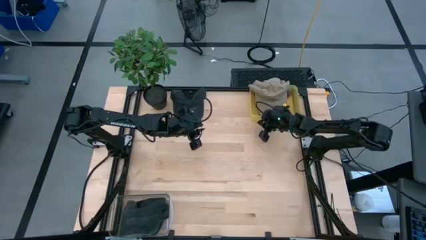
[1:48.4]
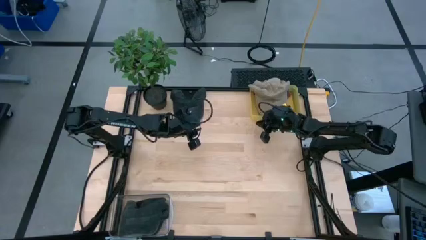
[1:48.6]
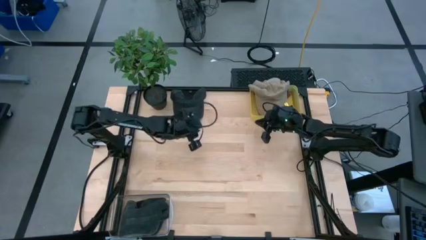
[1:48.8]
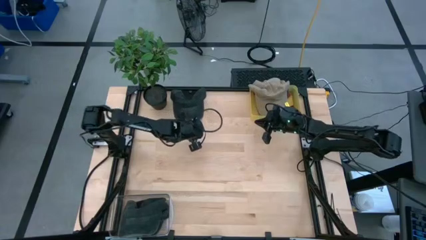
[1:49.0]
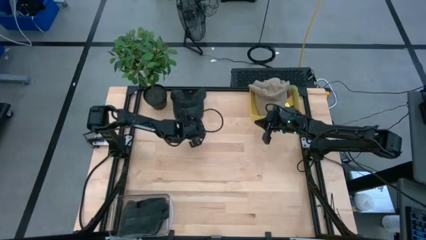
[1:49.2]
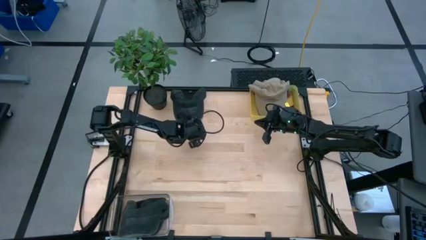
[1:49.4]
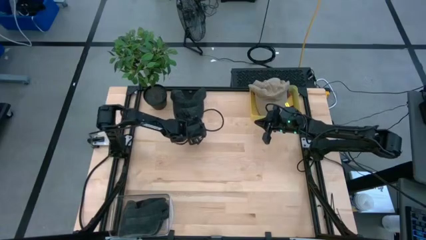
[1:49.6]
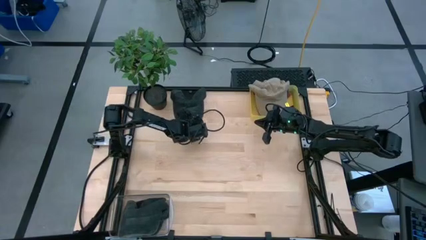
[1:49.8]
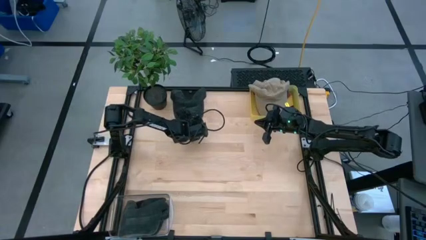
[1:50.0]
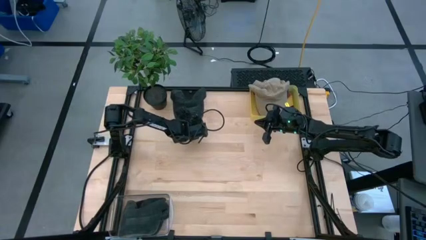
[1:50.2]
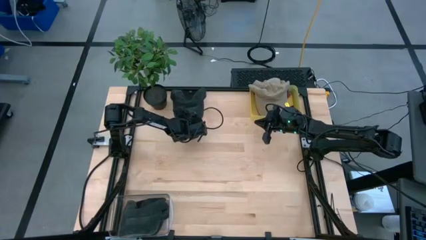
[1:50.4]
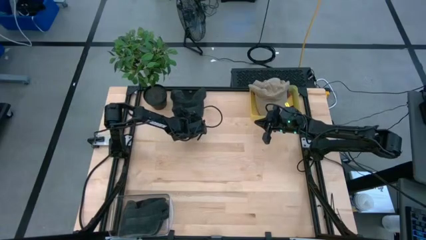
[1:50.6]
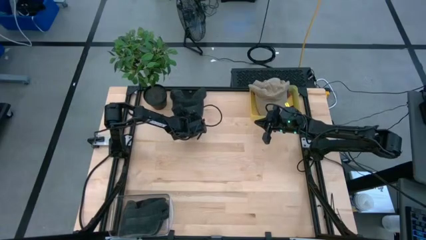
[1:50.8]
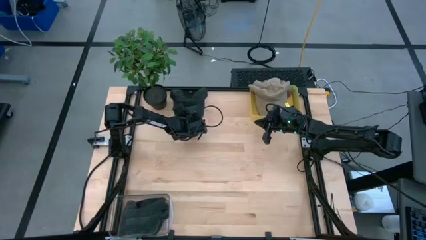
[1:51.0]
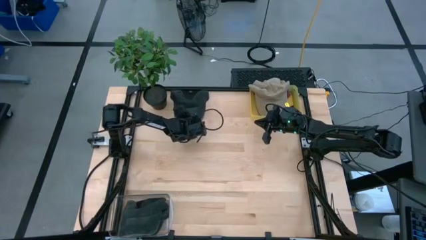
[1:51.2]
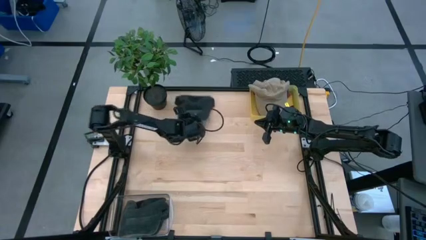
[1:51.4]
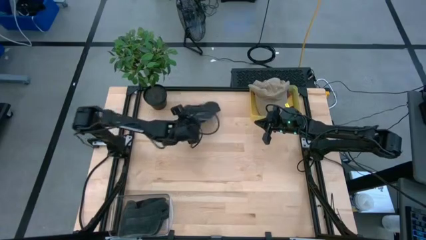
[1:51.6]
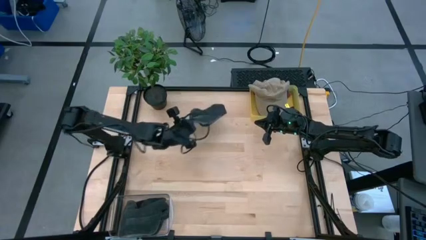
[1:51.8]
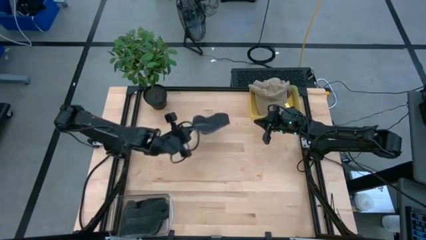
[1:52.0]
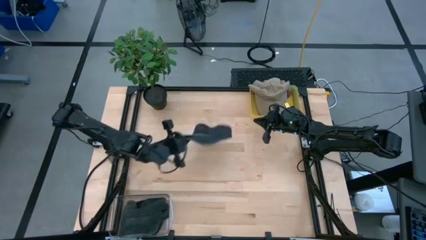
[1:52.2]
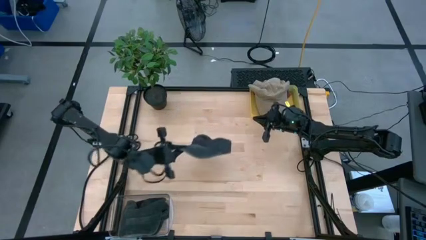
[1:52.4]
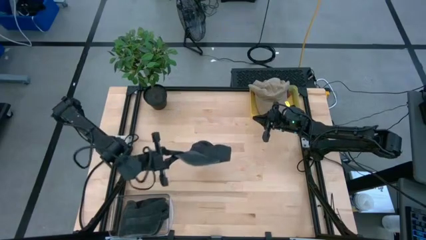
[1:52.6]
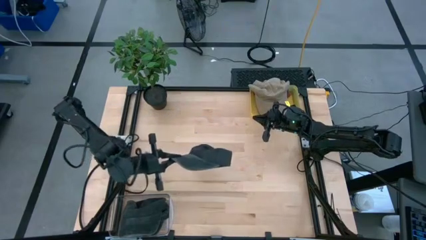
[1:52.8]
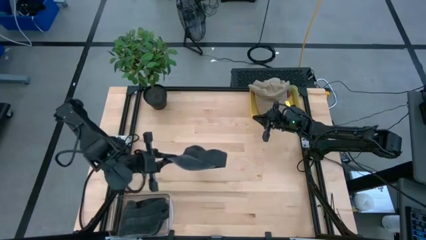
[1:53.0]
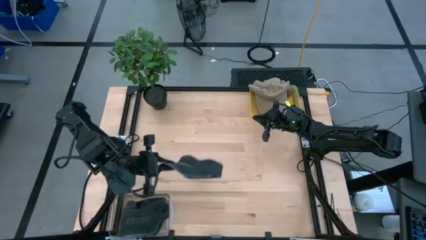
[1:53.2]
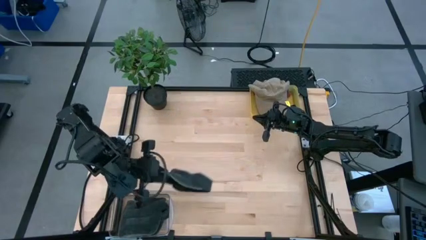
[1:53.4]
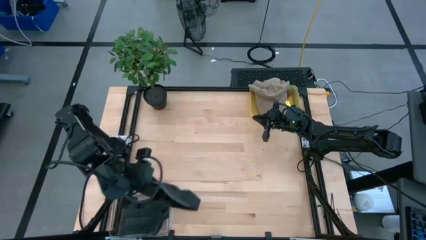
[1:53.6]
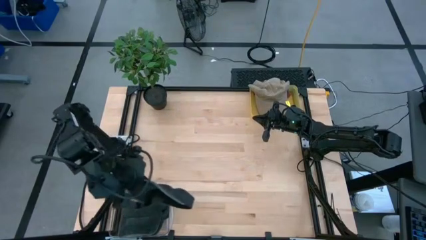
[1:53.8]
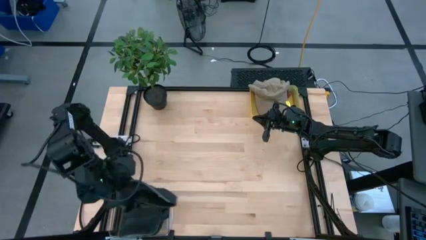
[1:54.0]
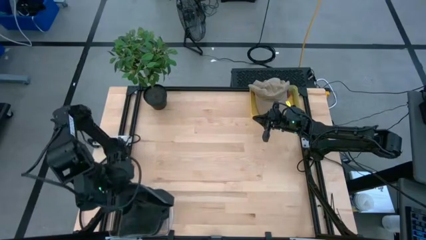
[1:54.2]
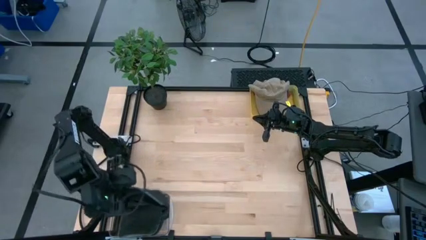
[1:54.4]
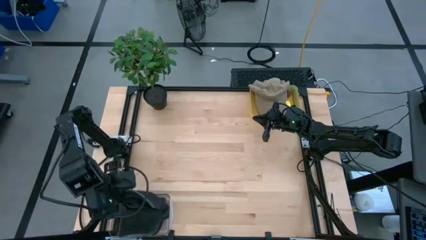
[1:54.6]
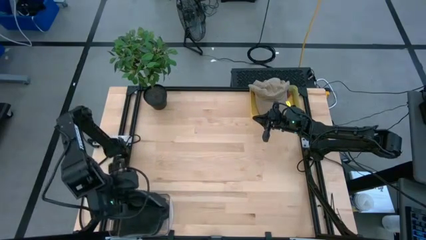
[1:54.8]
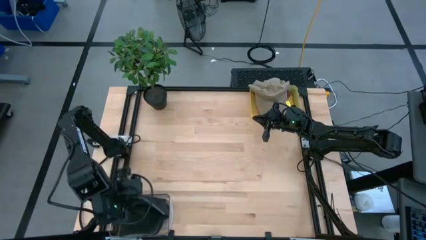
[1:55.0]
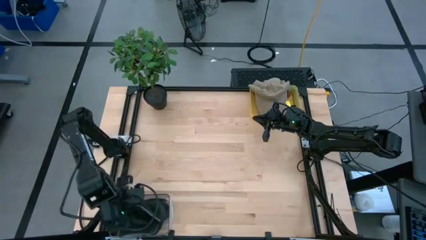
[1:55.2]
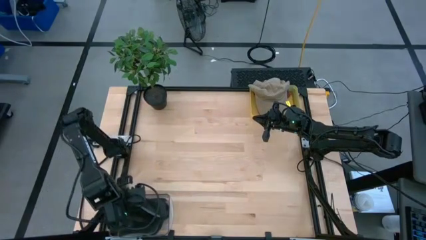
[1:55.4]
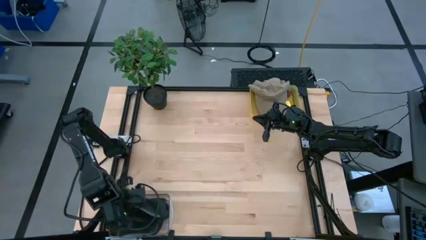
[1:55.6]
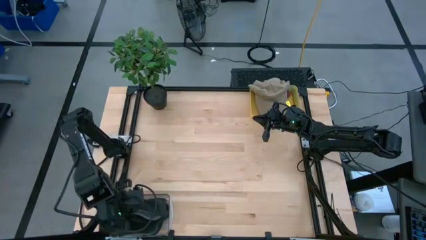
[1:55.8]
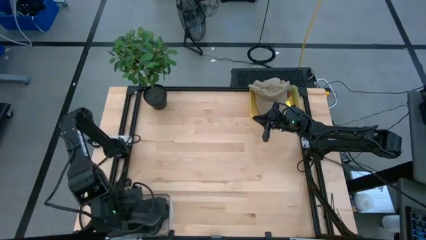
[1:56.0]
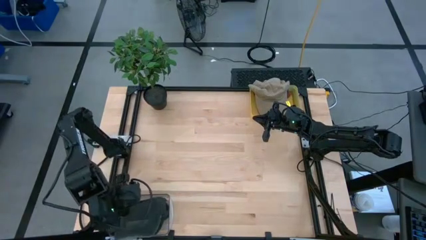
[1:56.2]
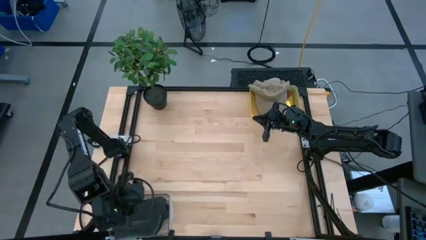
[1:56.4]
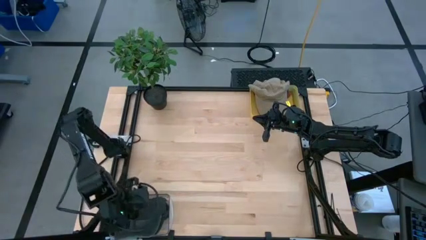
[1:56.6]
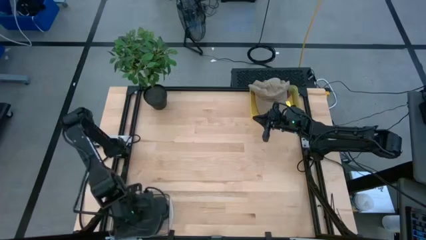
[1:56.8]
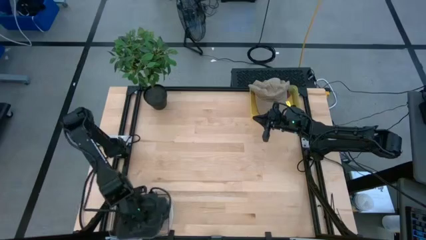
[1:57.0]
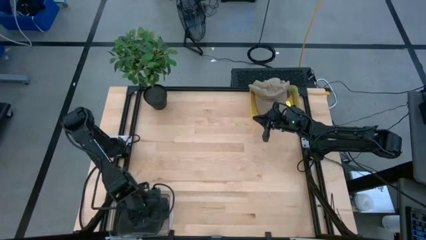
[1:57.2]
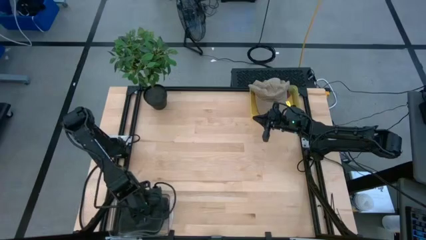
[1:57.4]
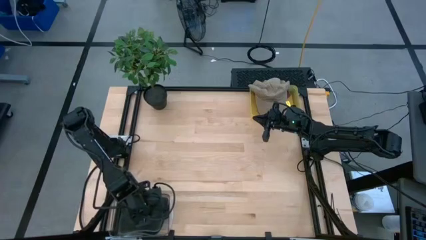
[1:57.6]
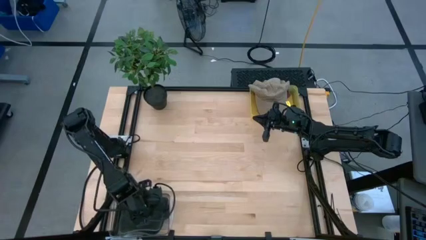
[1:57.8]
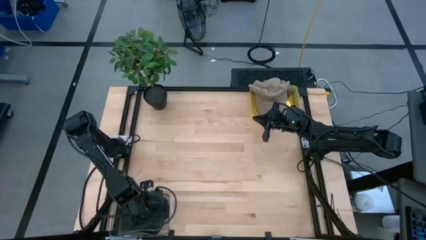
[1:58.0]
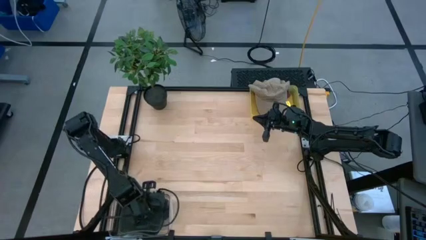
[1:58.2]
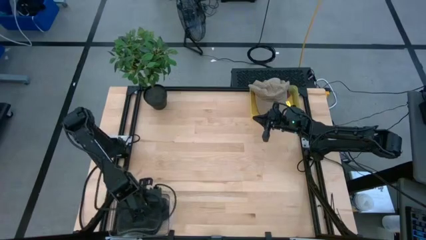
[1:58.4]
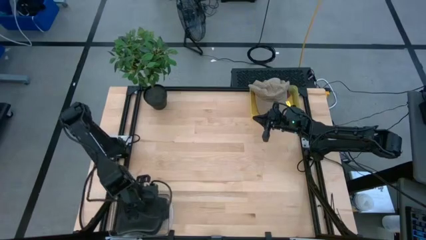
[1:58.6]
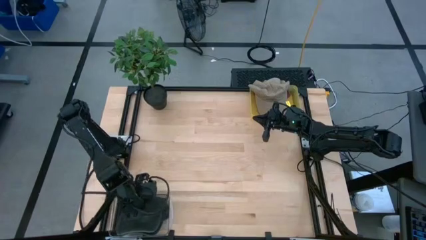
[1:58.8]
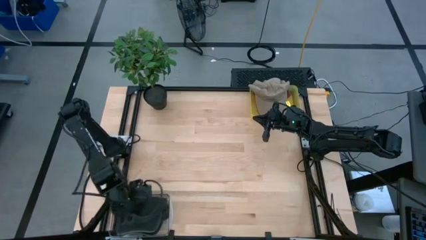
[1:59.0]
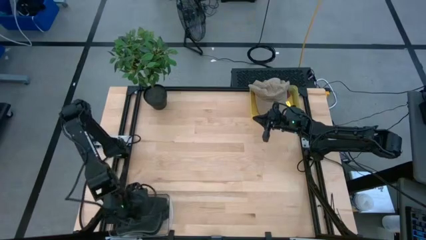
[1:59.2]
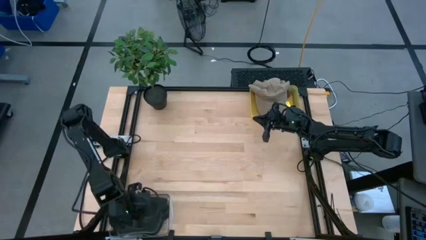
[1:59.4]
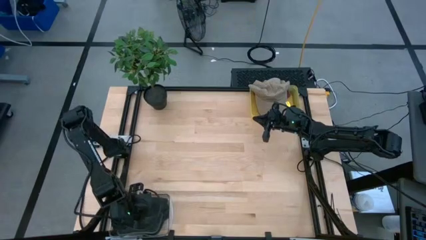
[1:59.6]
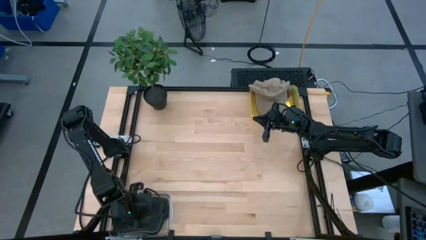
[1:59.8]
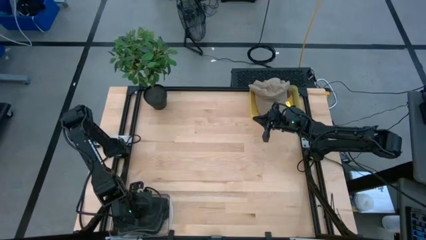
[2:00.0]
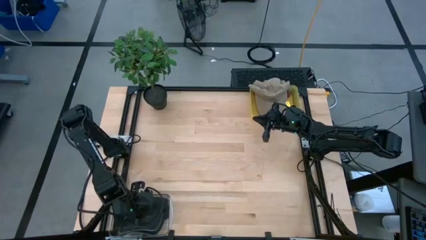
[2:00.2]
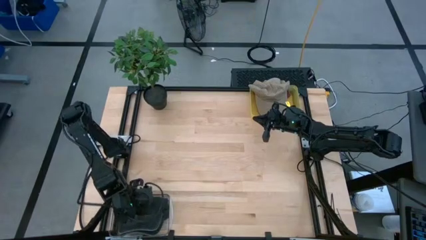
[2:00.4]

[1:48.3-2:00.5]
Task: Pick & Place hat
Put the black cap into the transparent bin

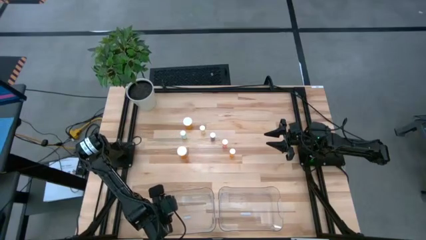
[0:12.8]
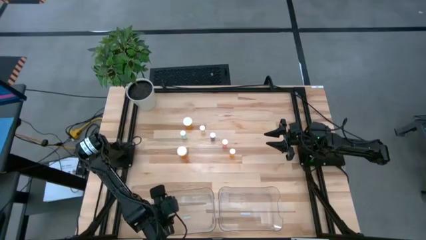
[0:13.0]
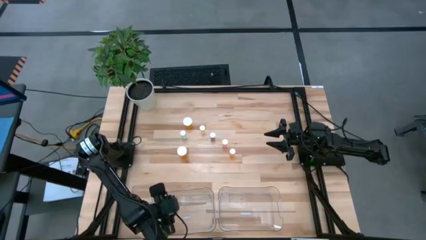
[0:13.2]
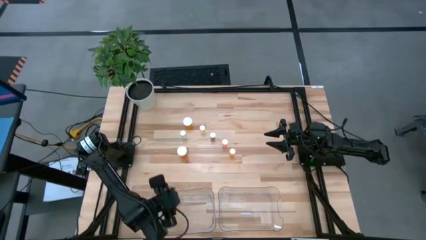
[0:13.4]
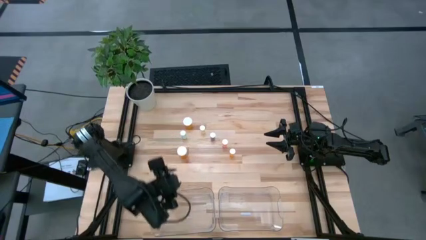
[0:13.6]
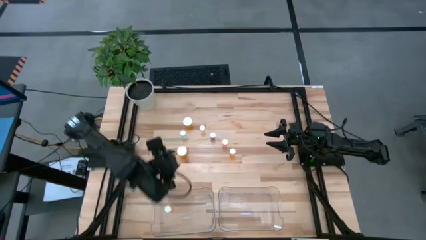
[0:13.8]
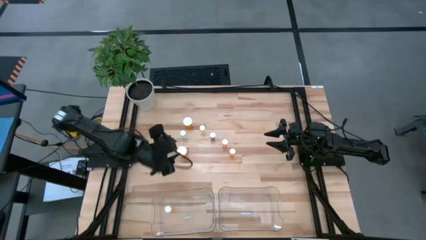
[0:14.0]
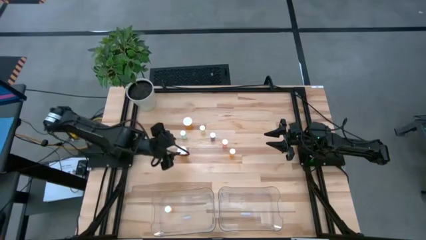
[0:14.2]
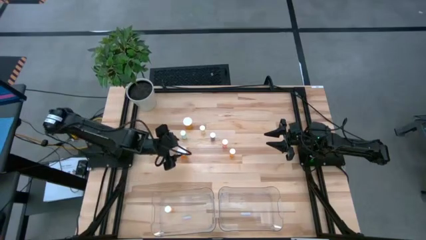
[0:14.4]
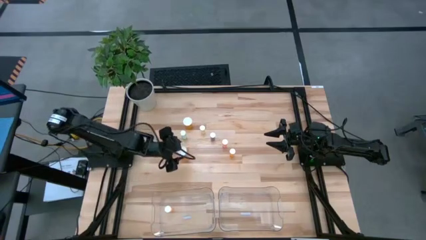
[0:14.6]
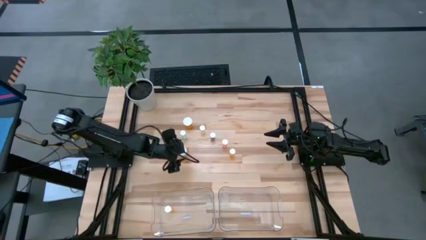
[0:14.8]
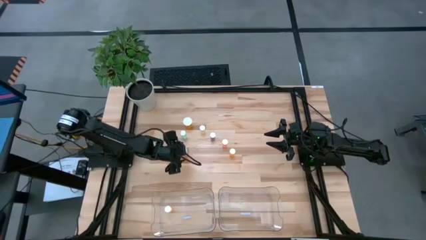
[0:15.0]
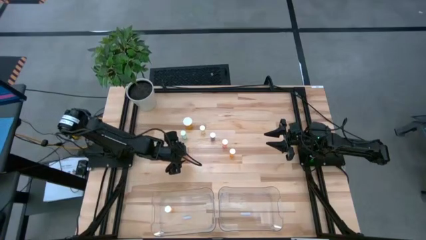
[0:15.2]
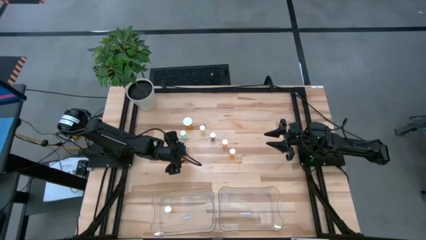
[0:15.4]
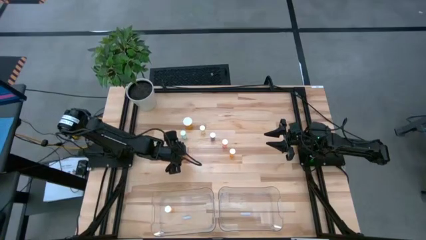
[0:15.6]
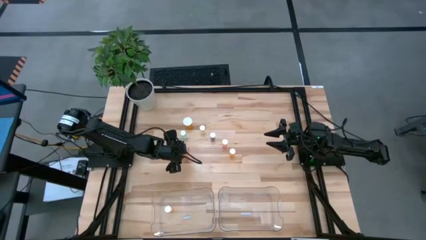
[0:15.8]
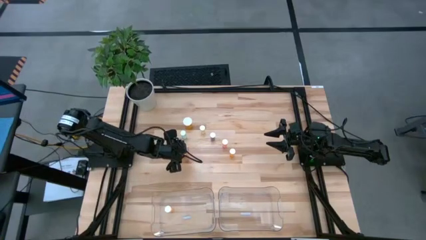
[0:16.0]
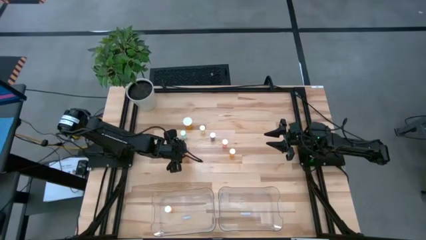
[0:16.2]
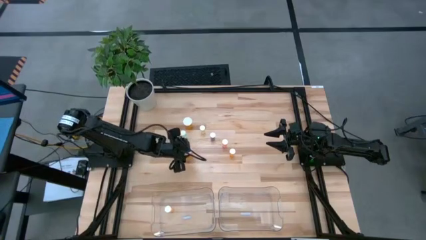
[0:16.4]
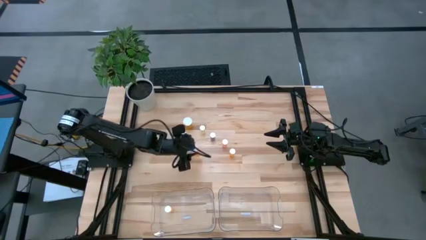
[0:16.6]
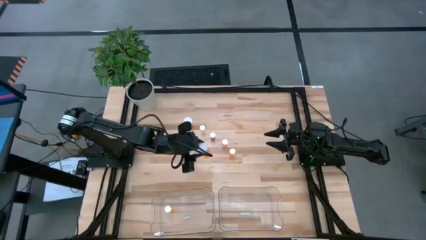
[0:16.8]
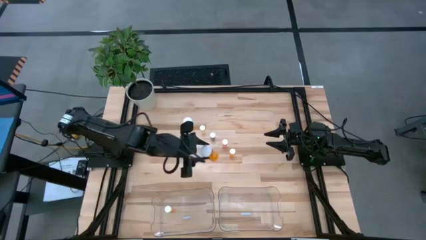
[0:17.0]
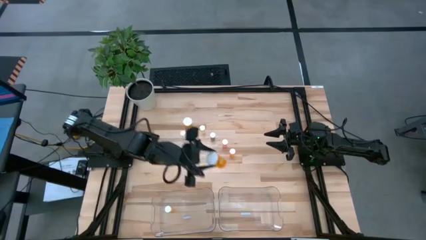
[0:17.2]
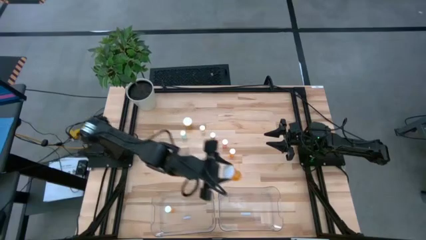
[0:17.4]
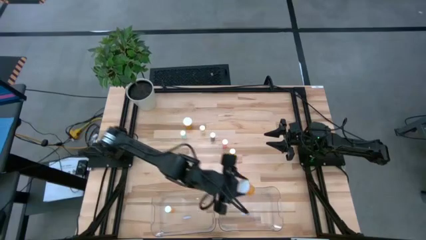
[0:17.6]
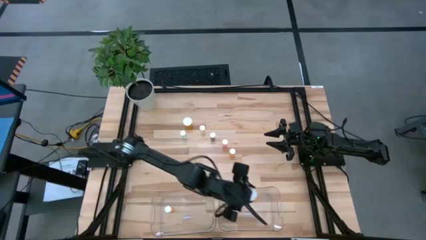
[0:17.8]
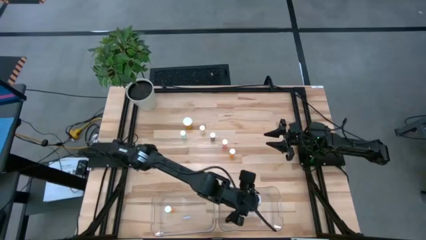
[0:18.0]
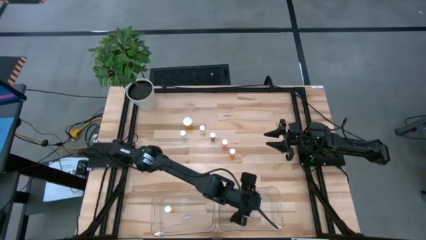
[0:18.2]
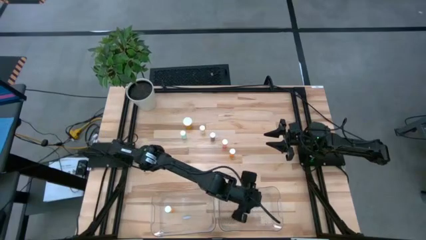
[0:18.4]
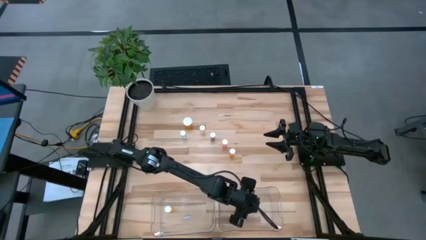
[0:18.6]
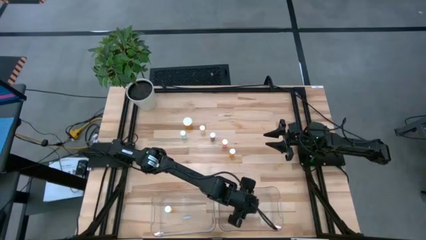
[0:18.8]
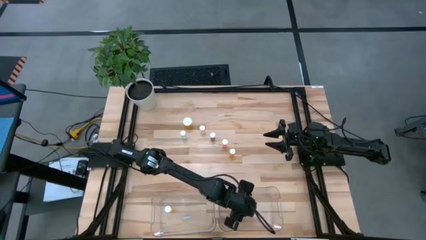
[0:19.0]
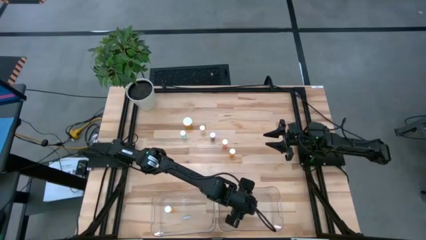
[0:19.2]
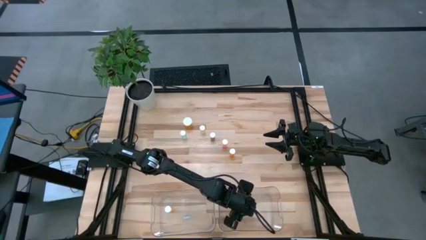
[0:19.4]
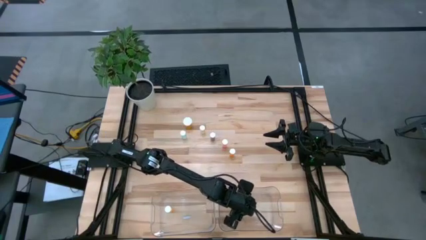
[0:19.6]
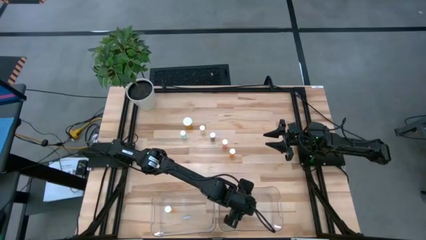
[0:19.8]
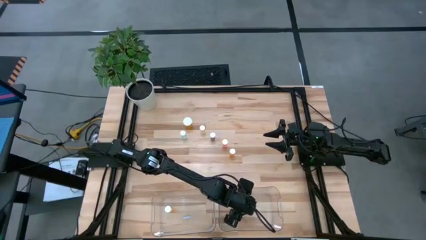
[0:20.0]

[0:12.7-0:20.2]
Task: Pick and place medicine bottles into bin by pill shape (circle, oval)
Put the orange capsule bottle into the right transparent bin
